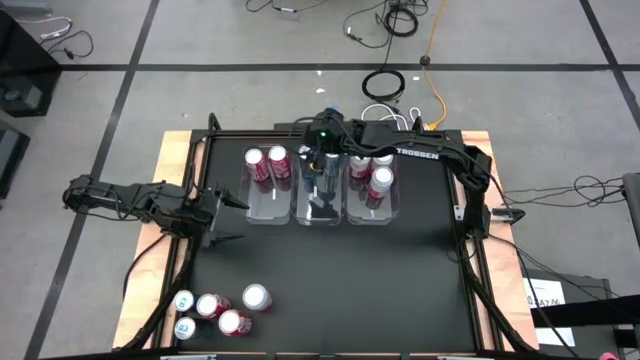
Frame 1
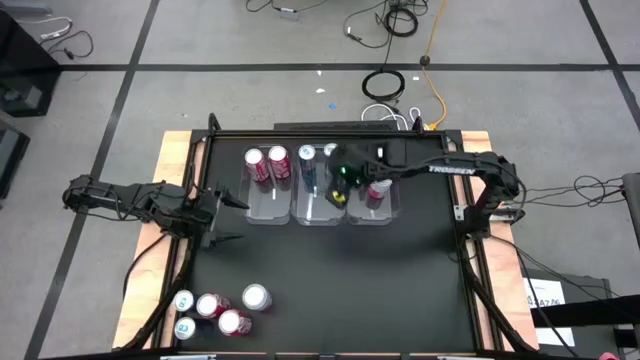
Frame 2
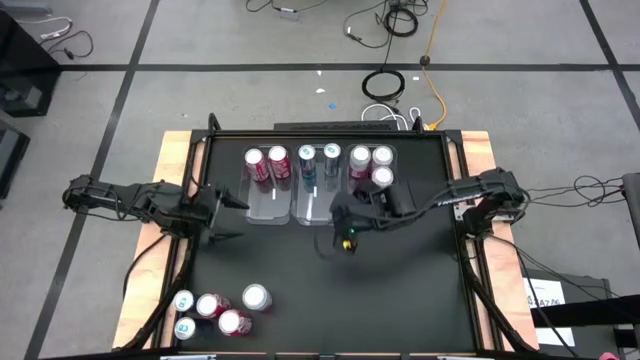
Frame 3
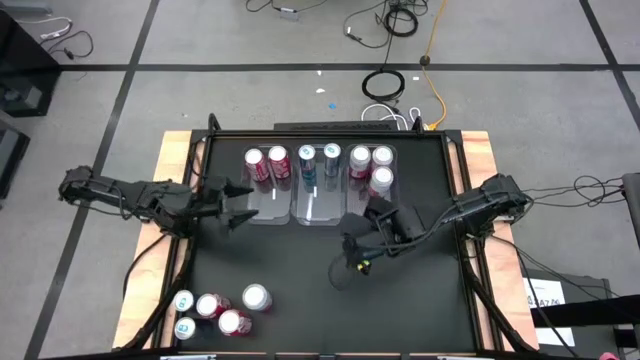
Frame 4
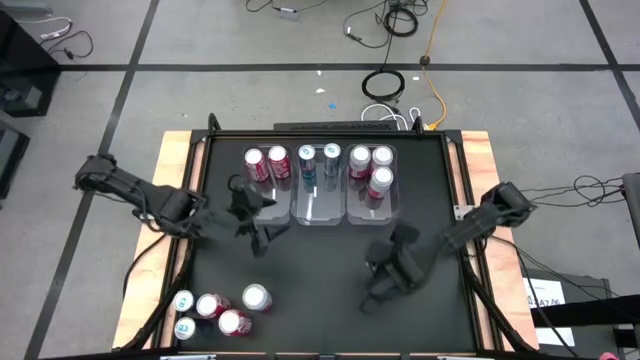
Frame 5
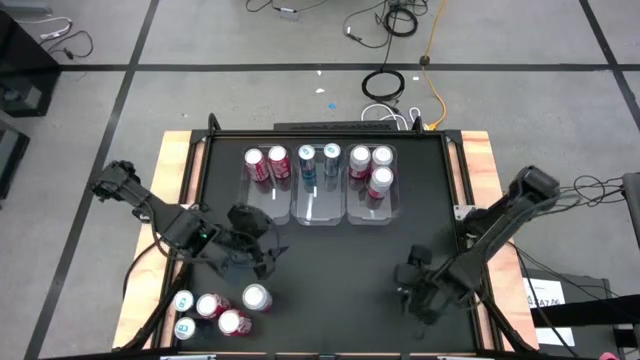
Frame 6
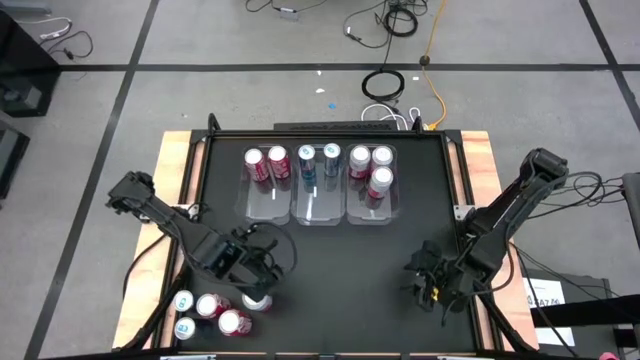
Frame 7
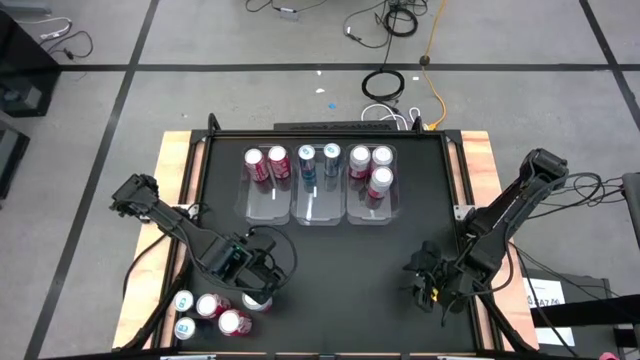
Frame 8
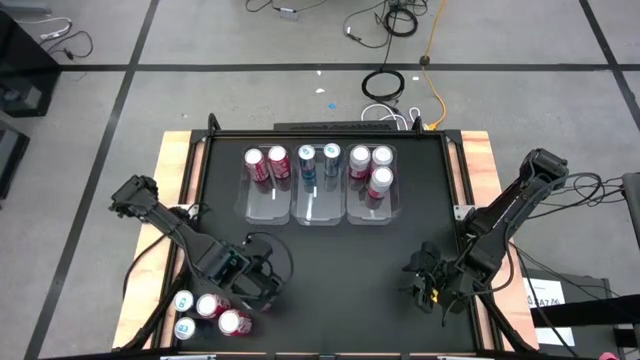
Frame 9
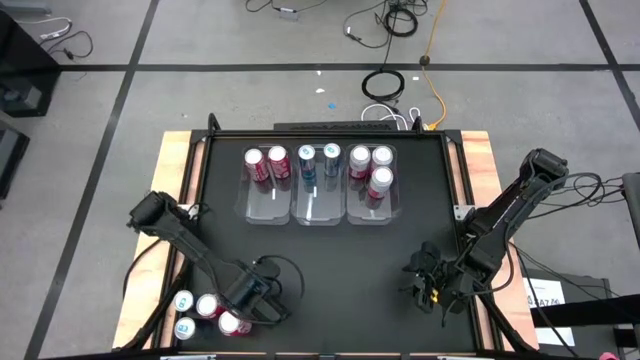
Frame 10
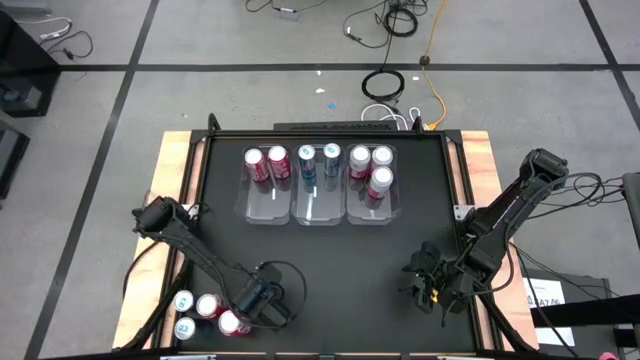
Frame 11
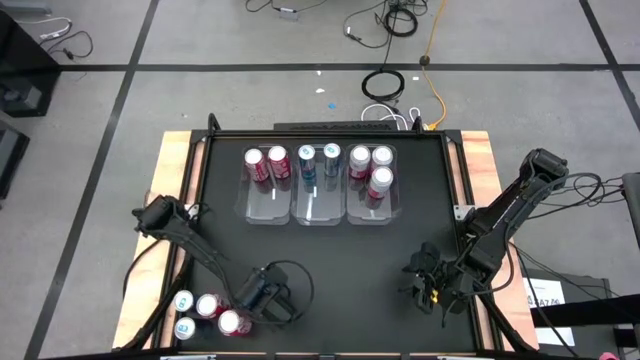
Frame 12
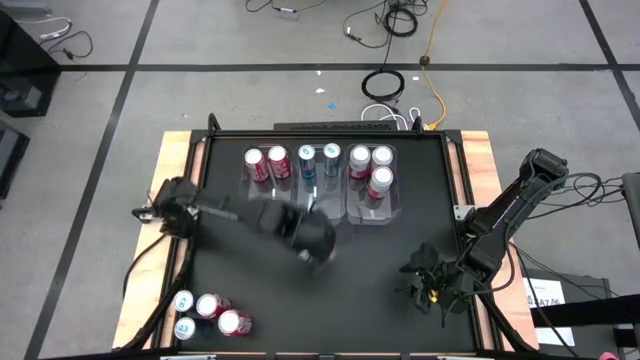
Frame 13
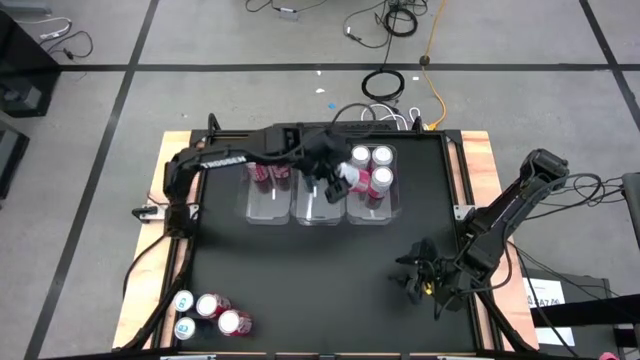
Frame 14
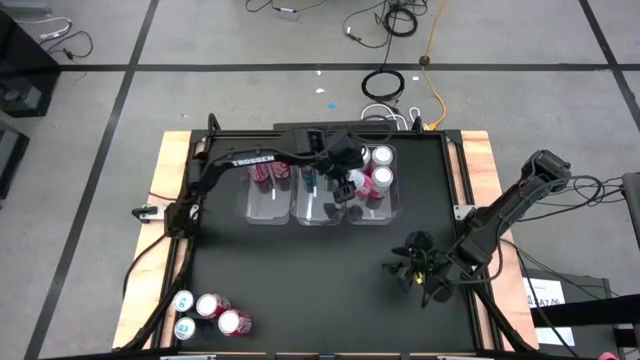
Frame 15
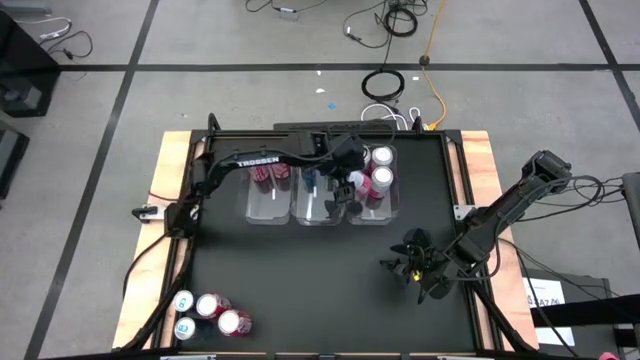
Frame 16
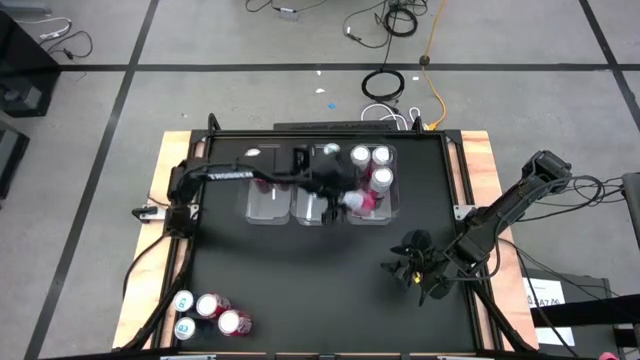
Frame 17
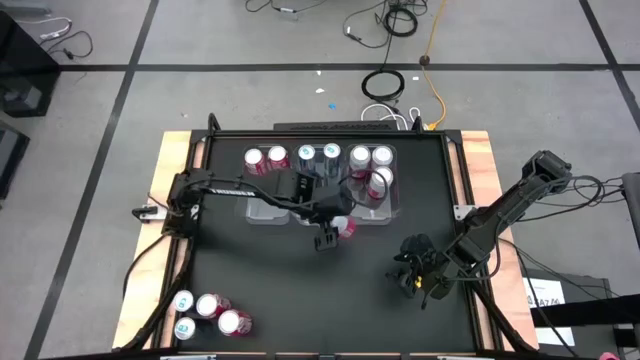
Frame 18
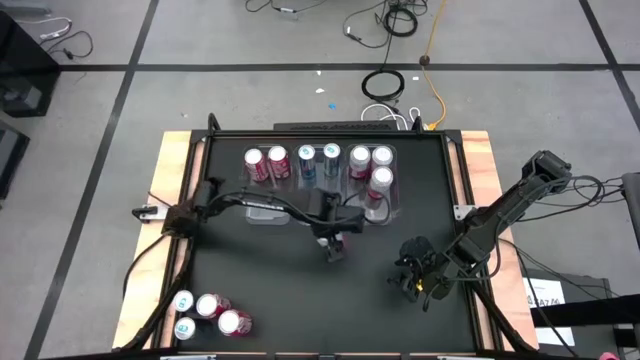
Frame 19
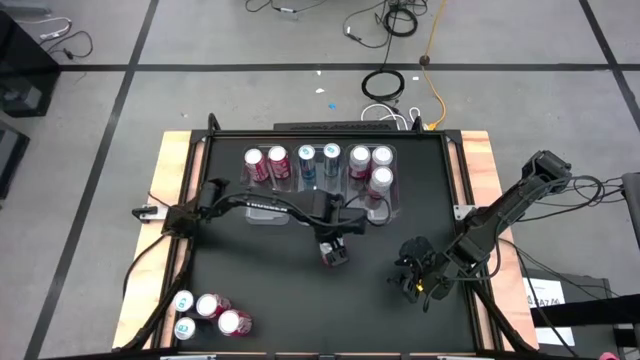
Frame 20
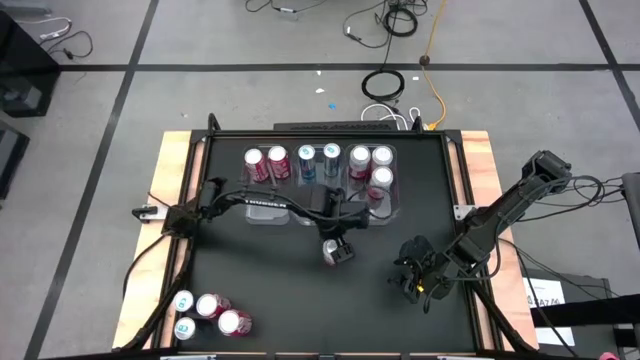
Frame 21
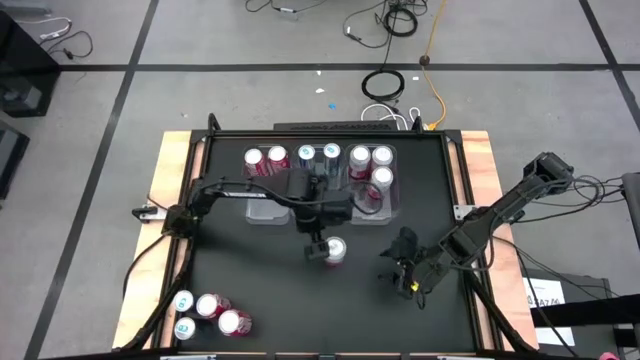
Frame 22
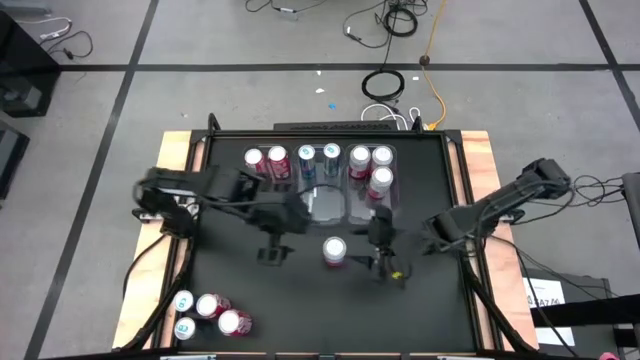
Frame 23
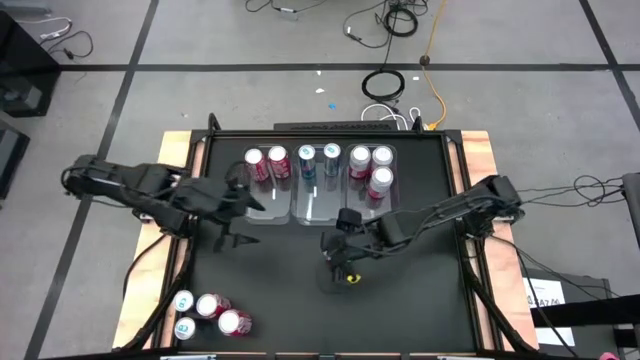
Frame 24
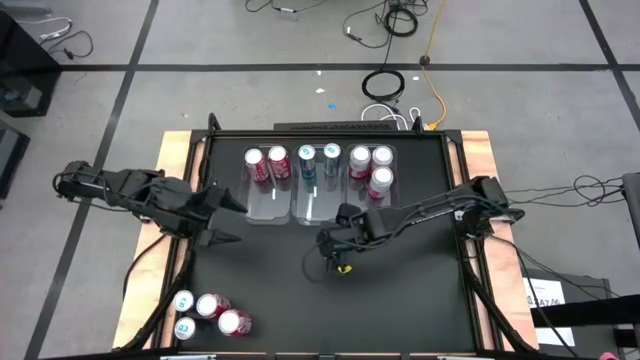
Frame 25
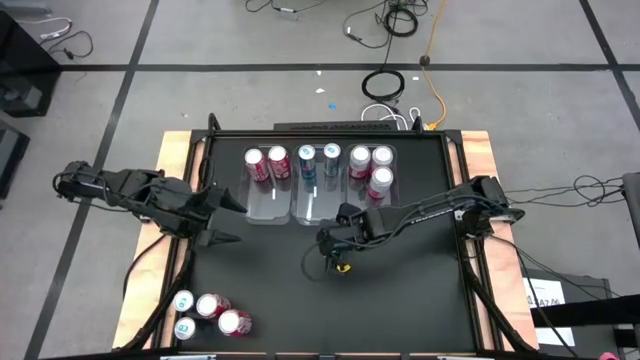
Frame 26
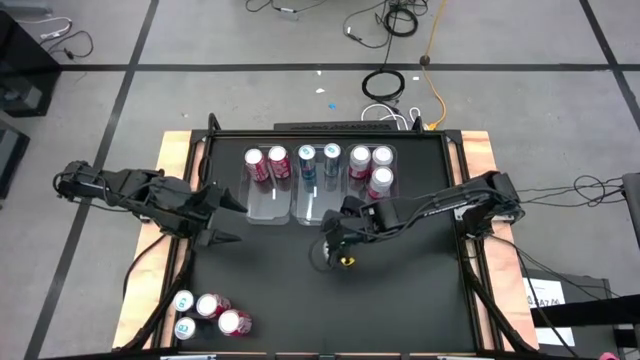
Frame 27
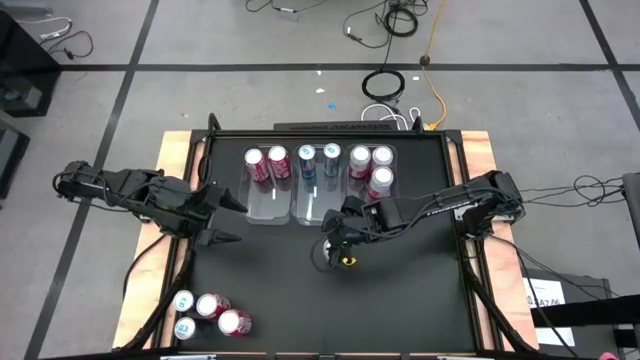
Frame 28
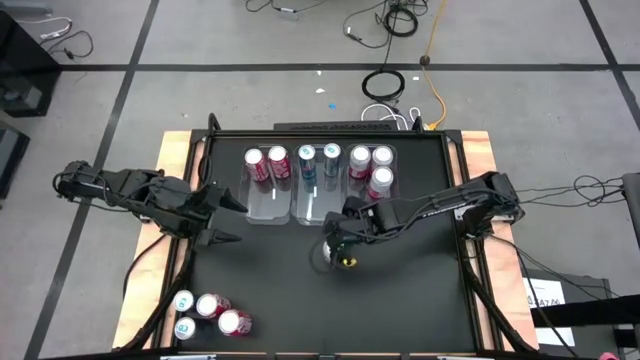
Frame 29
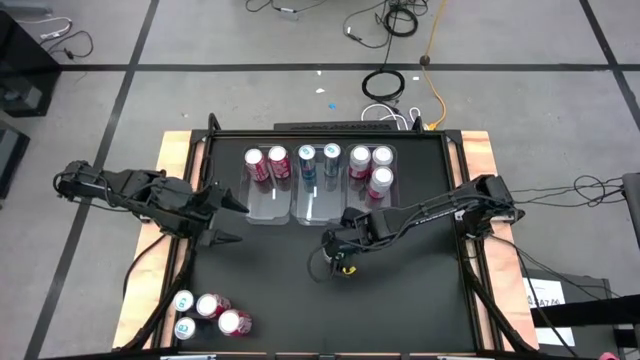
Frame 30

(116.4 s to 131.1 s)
Task: Sort soda cans
Put the pink-white soda can into the right transparent bin

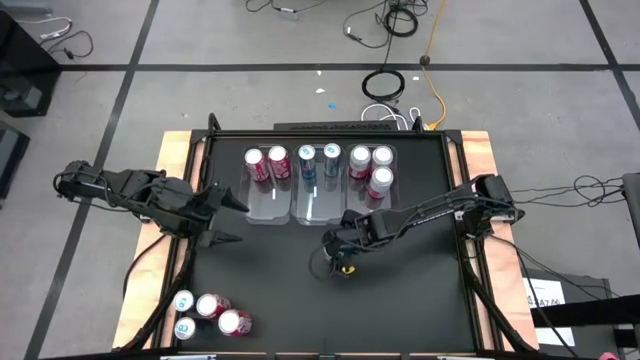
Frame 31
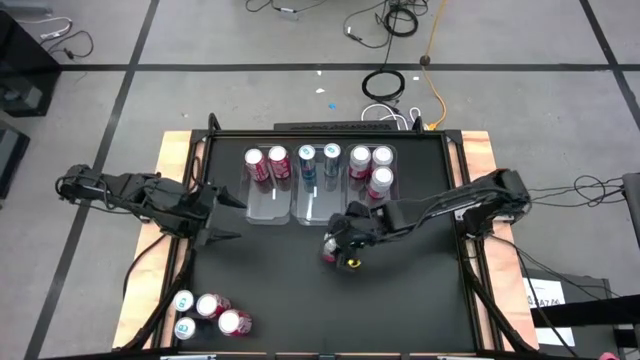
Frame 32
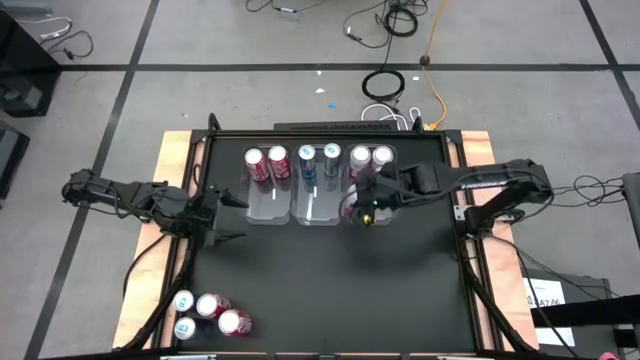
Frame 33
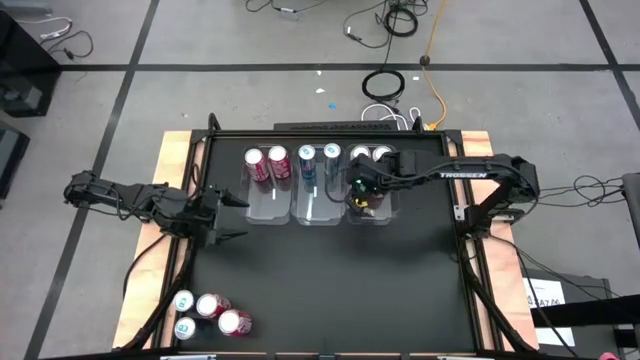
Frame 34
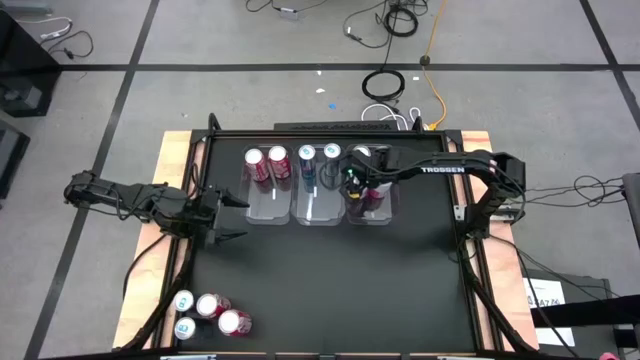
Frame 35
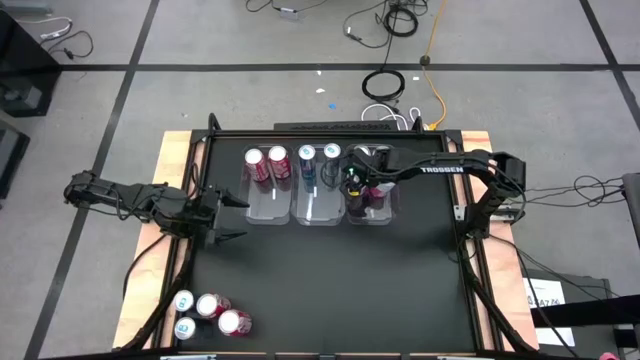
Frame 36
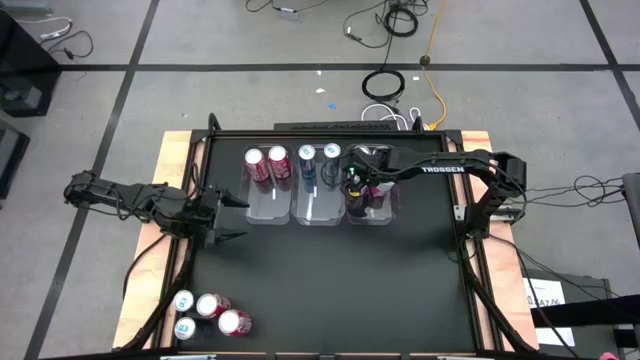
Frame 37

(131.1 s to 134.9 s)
Put the pink-white soda can into the right transparent bin

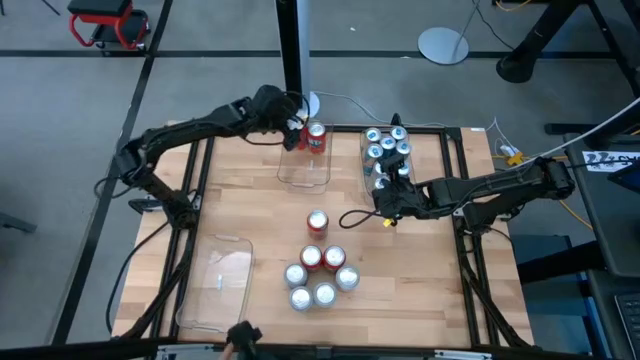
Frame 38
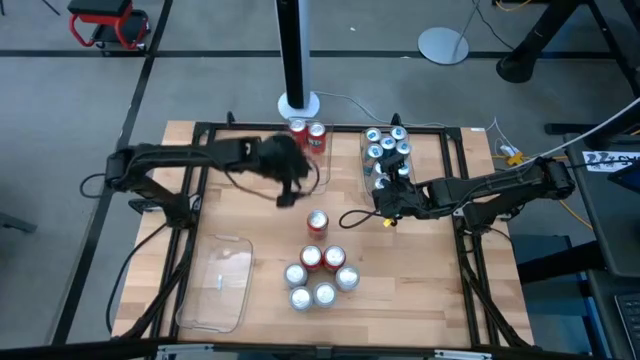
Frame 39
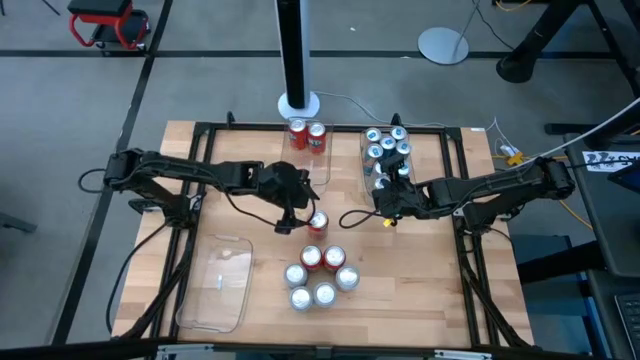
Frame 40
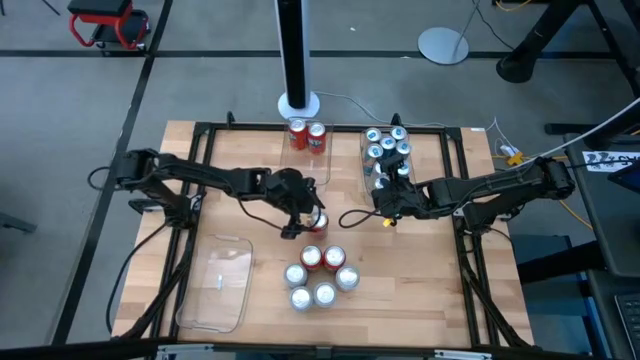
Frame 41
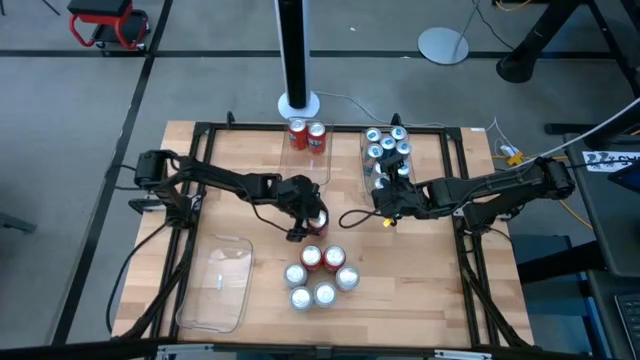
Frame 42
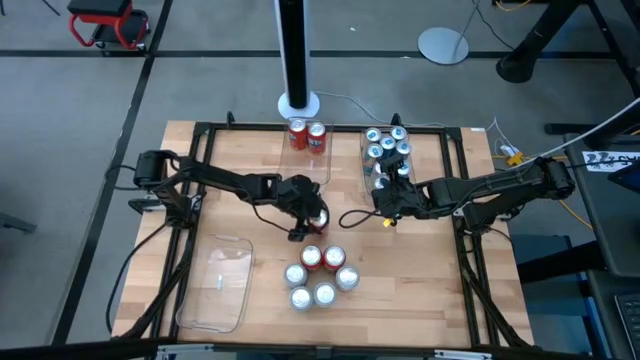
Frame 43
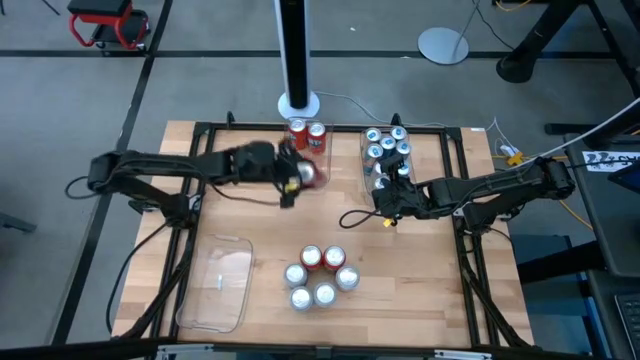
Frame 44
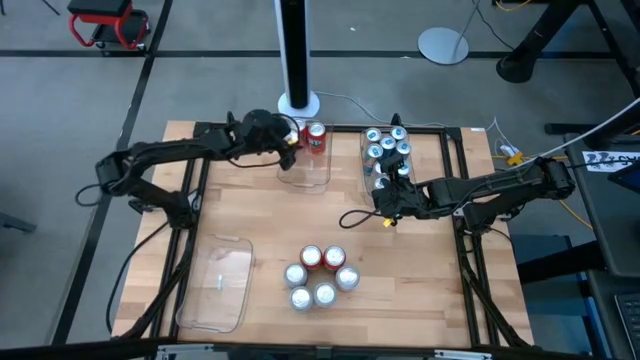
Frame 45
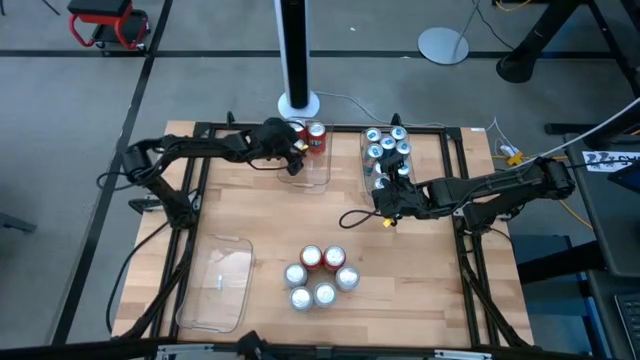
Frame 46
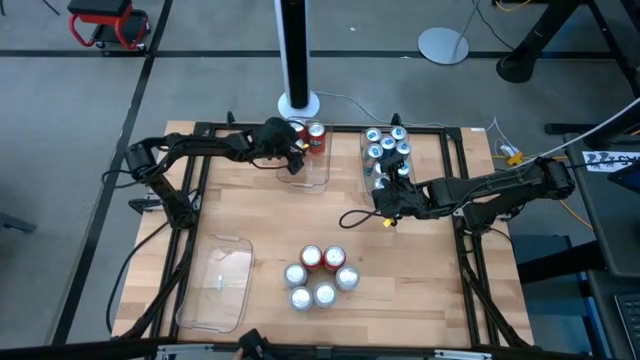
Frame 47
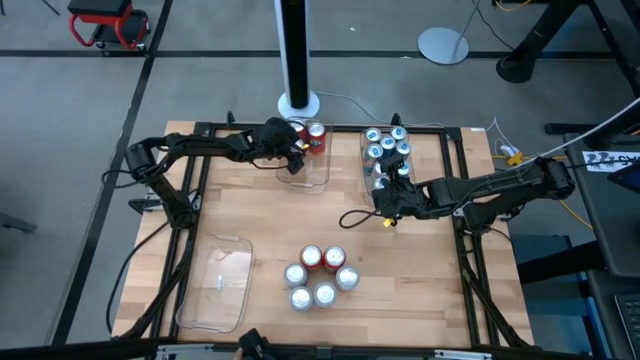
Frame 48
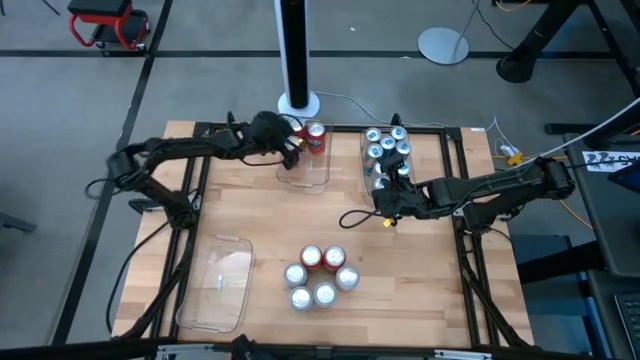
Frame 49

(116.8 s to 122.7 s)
Task: Sort soda cans
Put the red soda can into the top center transparent bin
